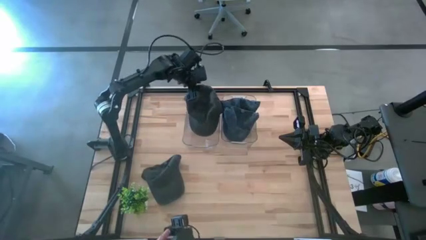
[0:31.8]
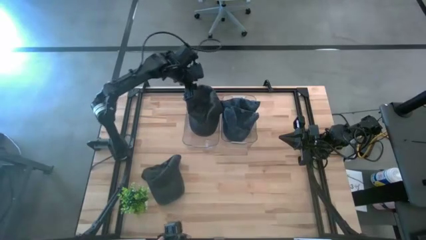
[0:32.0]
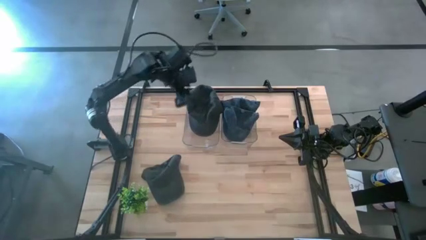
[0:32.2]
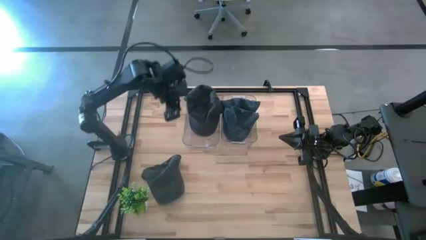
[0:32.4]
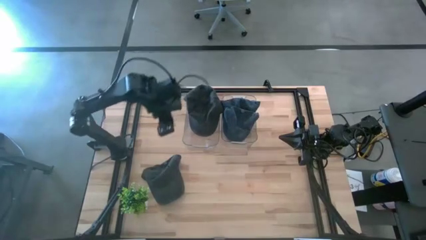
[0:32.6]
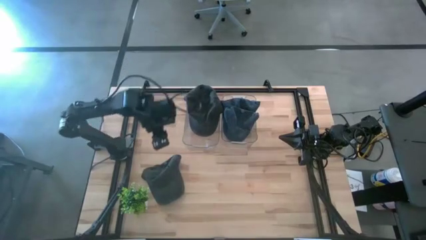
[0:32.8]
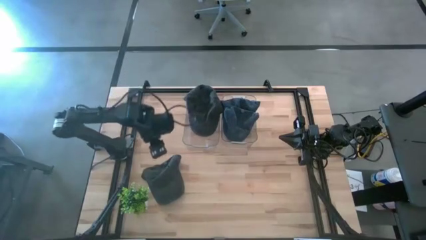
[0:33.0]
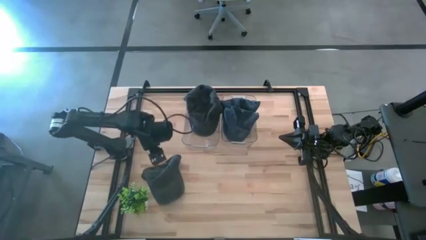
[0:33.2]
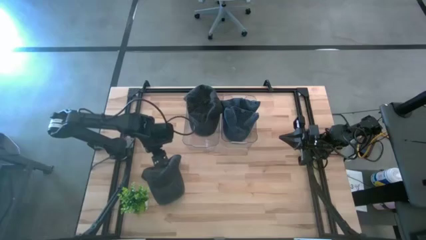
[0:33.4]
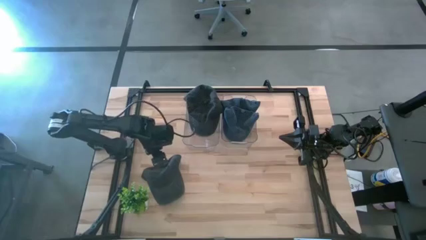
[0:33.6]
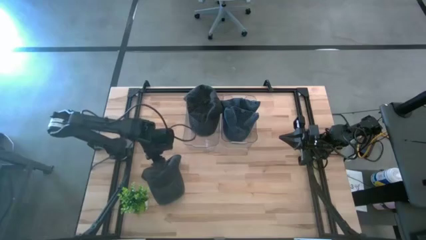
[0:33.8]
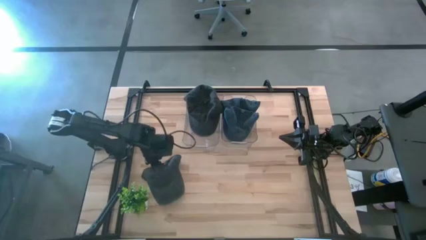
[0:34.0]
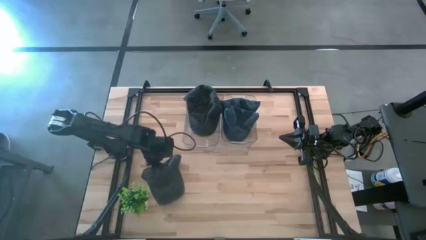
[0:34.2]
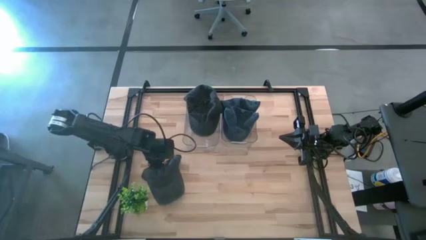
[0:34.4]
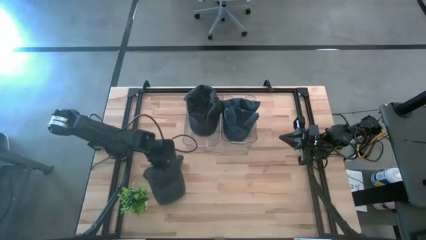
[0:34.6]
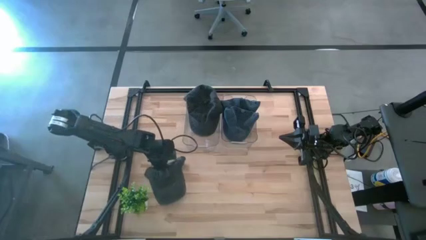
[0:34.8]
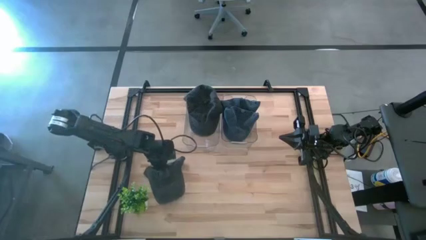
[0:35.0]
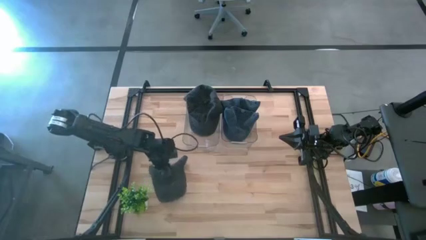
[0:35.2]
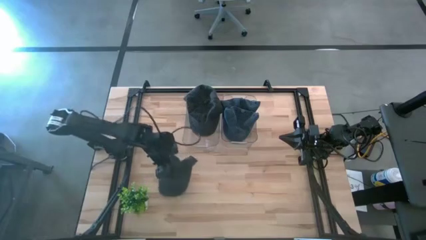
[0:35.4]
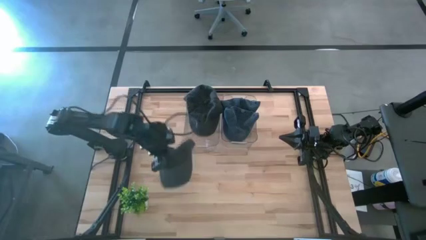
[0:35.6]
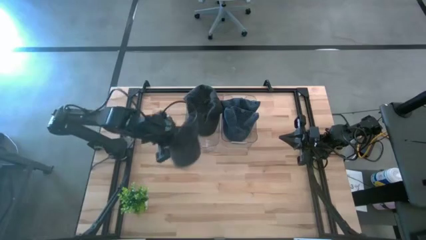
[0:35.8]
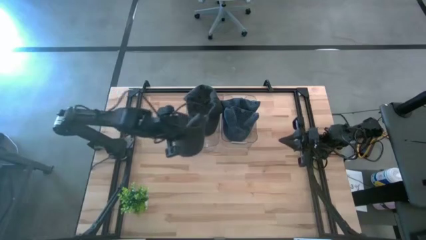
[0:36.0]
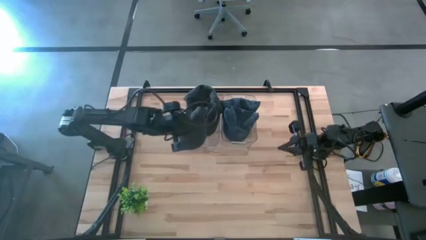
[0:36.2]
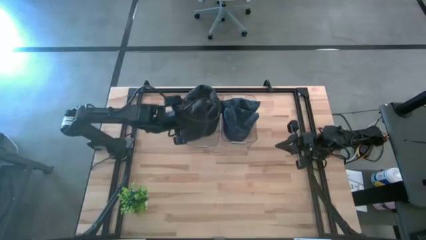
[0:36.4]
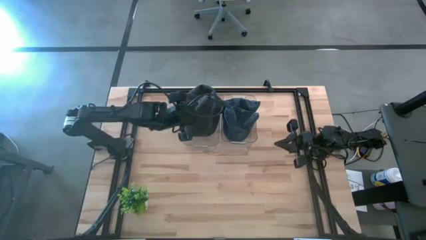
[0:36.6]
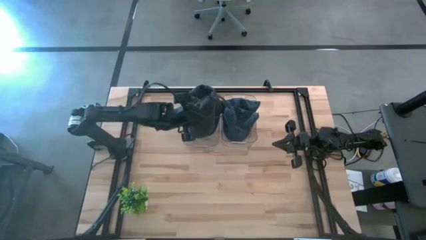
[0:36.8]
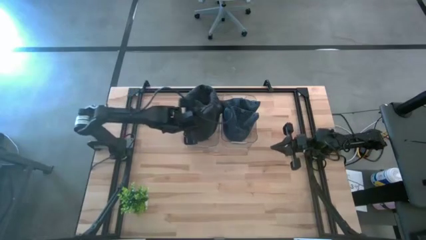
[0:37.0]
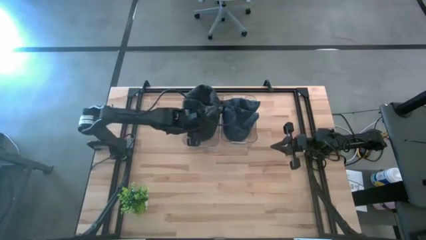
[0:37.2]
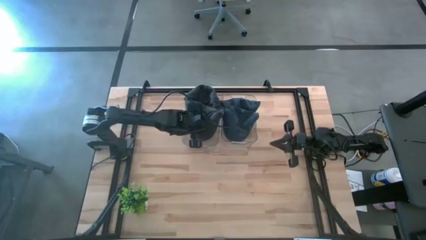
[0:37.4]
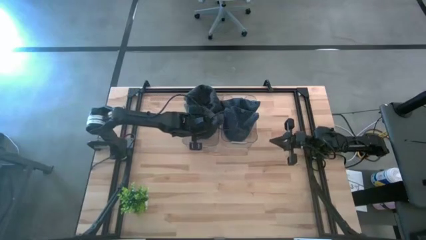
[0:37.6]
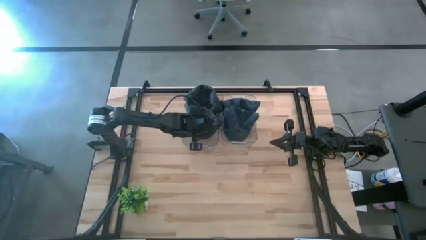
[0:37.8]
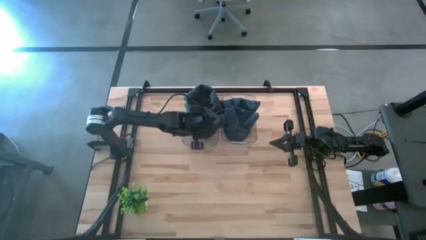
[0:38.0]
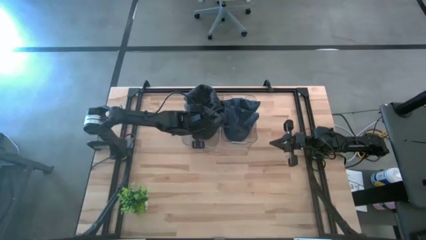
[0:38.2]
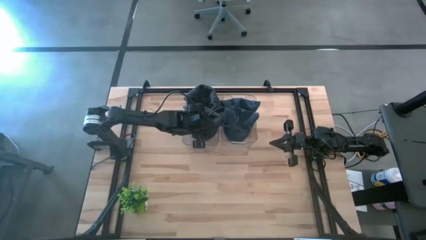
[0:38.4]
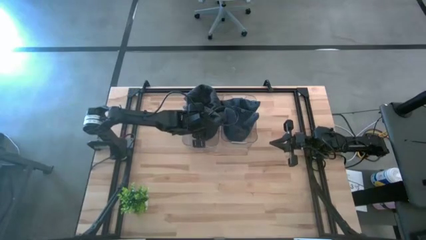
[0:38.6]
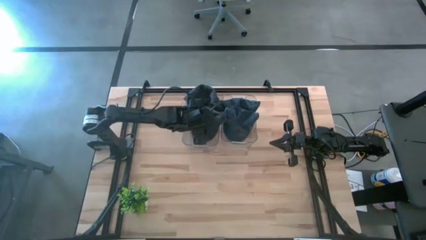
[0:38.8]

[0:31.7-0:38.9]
Task: Pick & Place hat
Put the gray cap into the left transparent bin

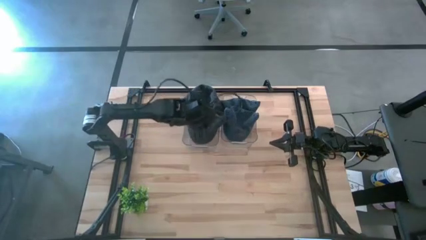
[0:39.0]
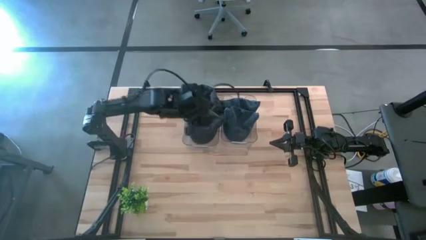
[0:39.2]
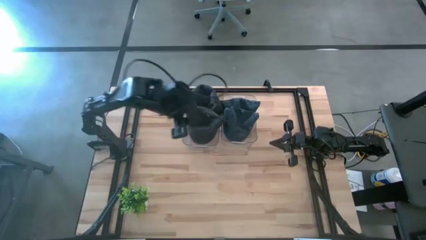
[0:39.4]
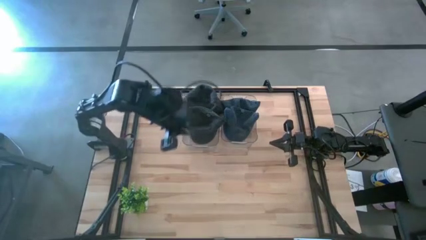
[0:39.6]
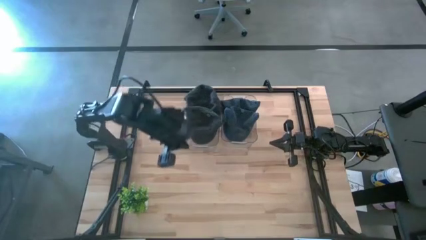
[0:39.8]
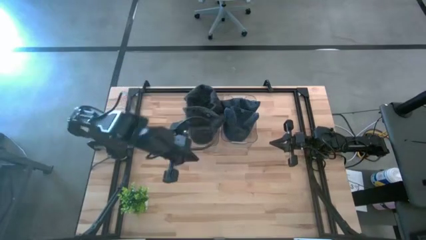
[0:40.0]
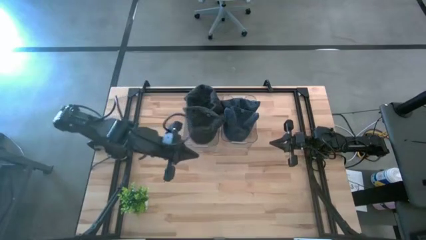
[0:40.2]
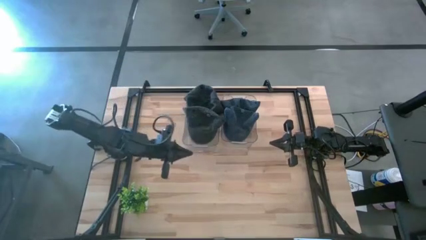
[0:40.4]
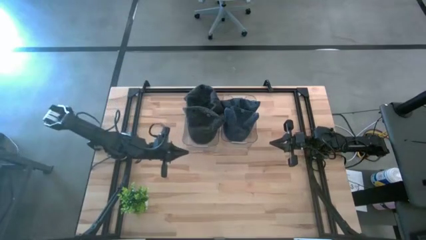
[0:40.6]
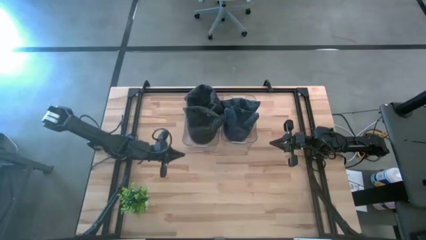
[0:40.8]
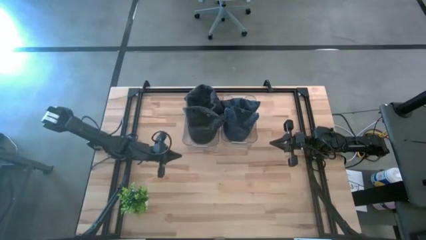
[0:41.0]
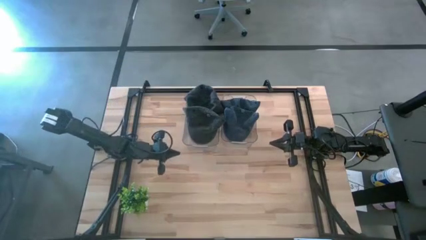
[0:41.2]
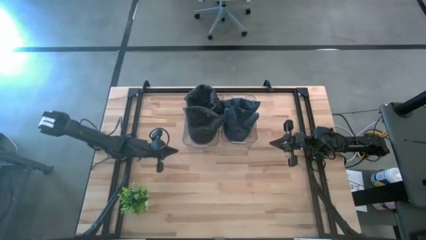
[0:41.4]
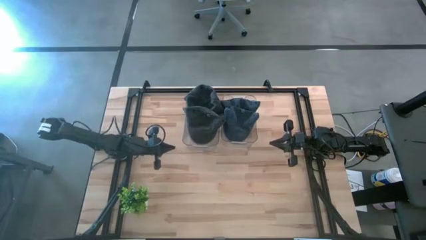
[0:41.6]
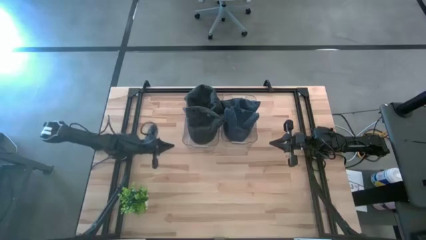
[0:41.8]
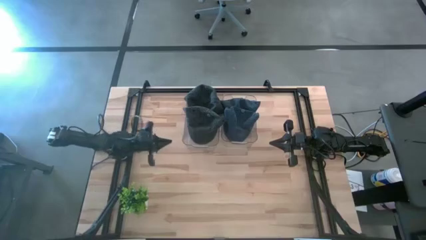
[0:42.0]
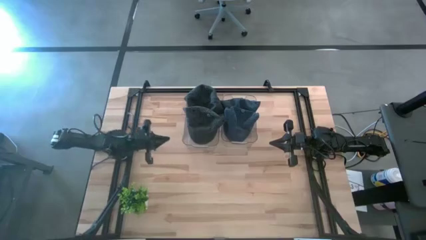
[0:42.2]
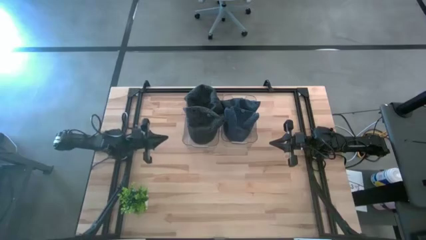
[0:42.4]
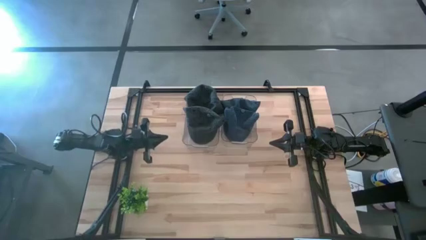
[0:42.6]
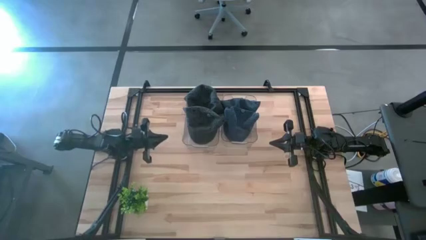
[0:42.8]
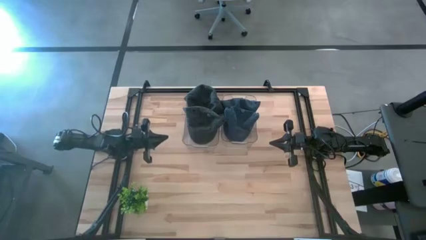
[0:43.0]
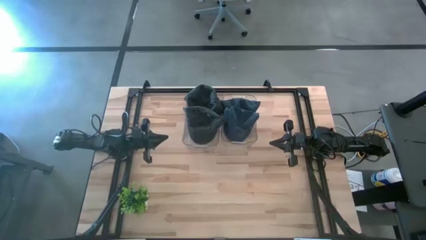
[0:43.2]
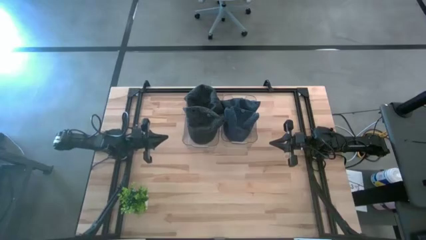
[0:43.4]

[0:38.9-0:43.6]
Return to Home Position
